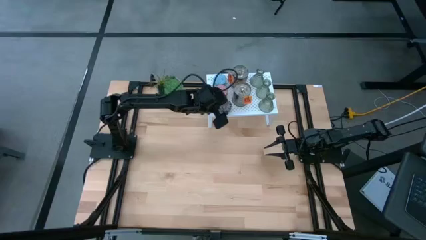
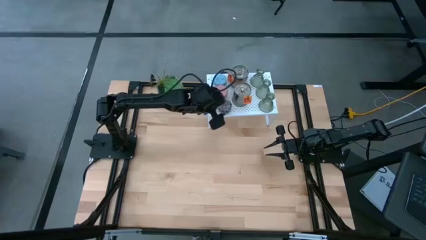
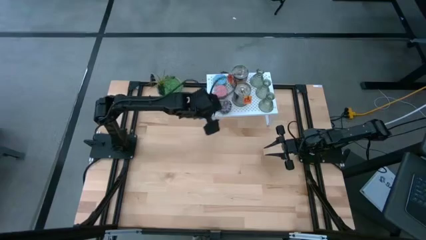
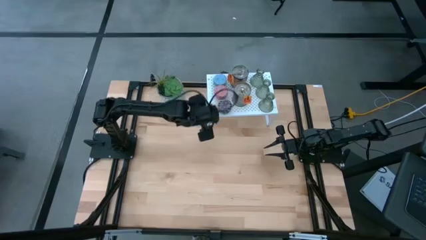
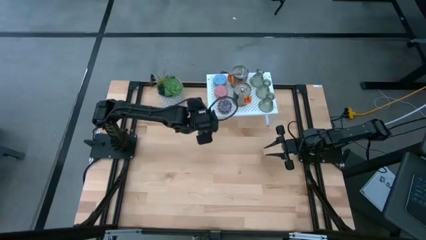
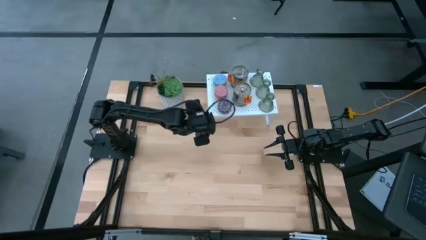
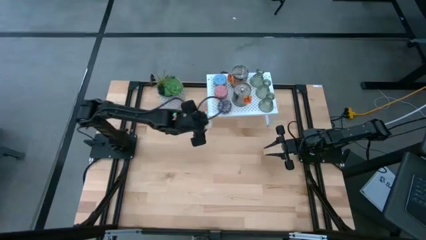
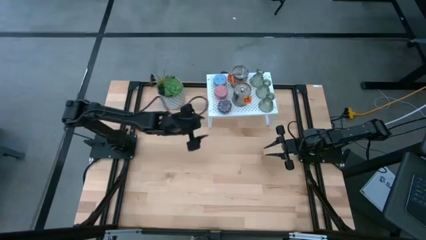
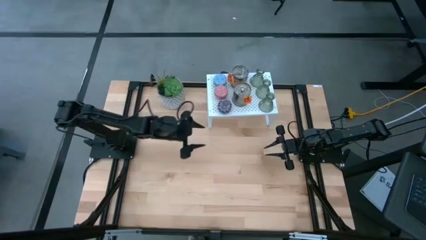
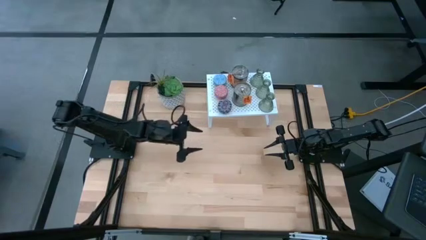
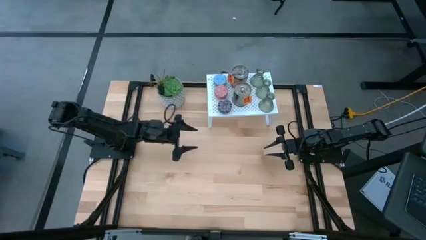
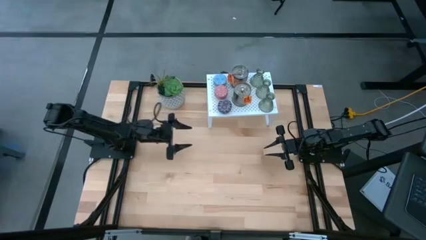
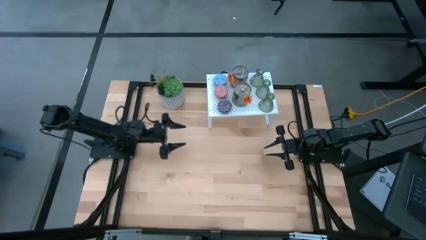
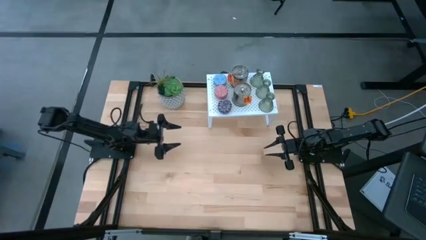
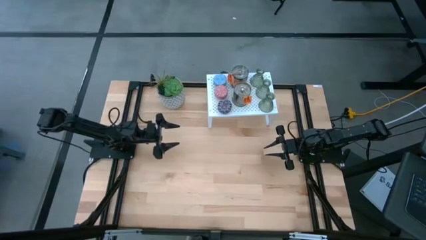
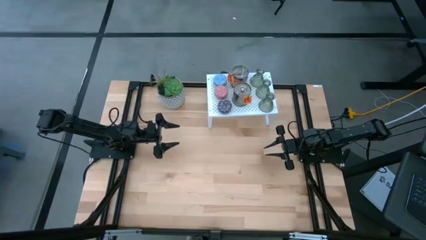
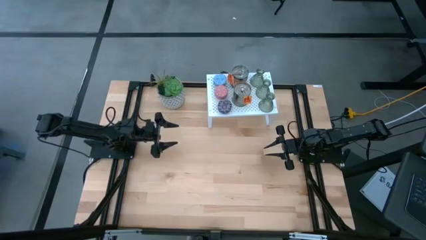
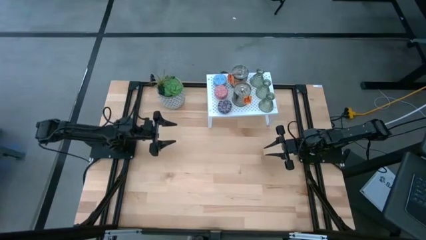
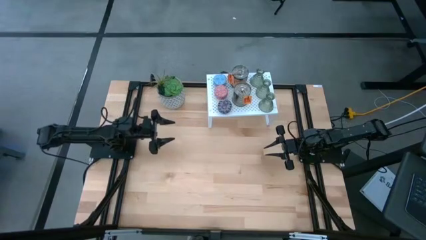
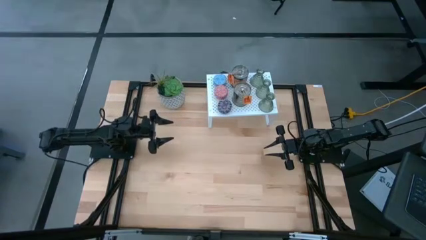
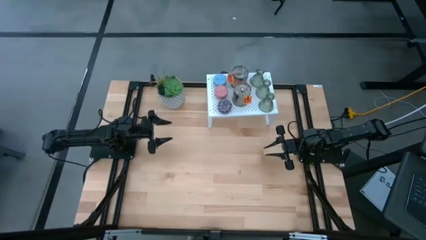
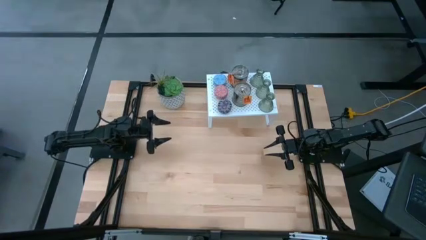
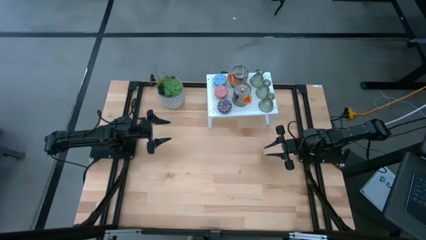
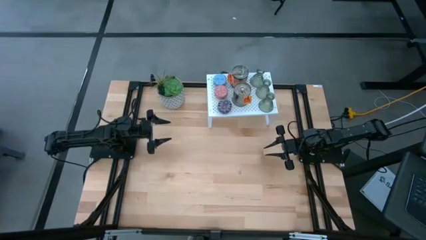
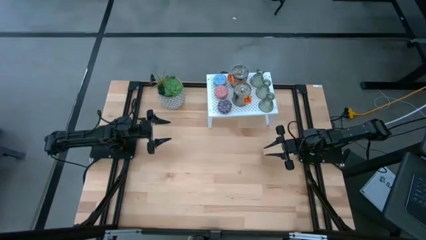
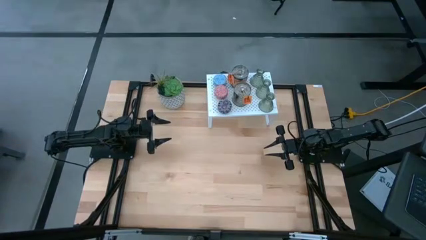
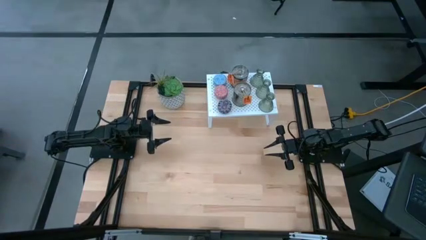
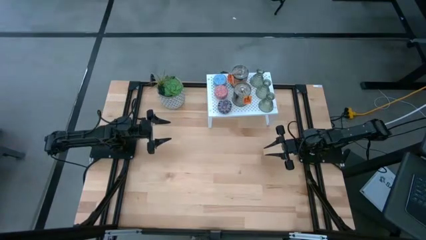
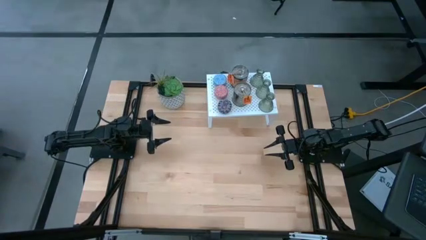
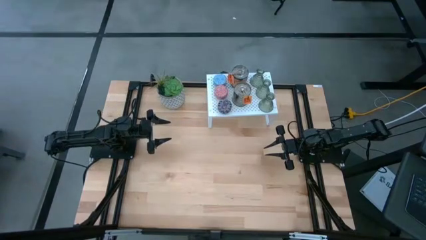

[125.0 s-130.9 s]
Task: Pick & Place candle stick holders
Return to Home Position

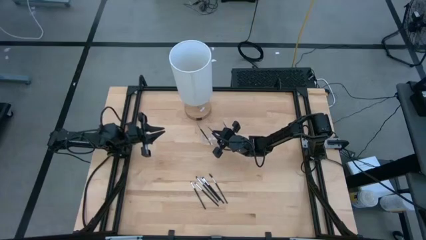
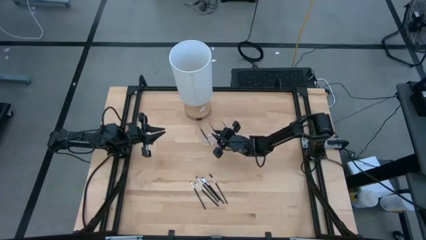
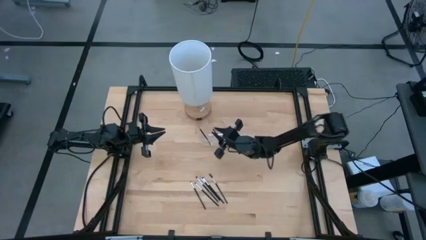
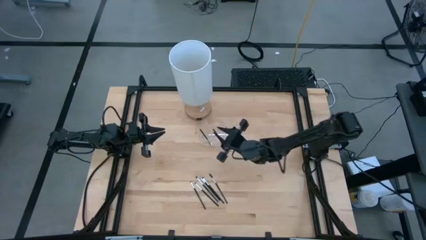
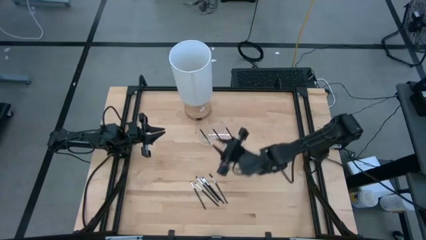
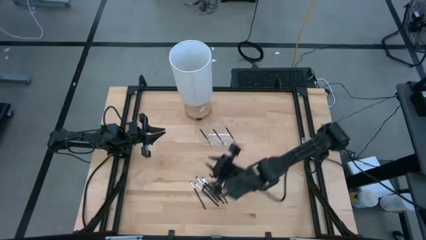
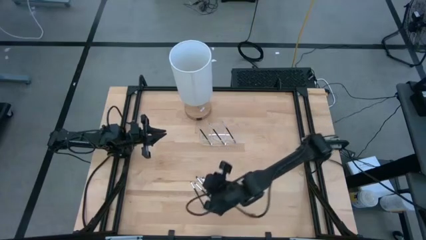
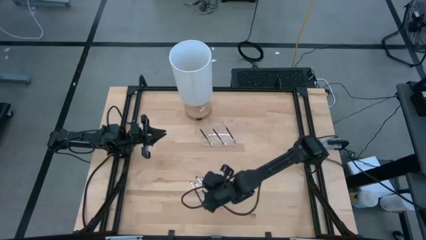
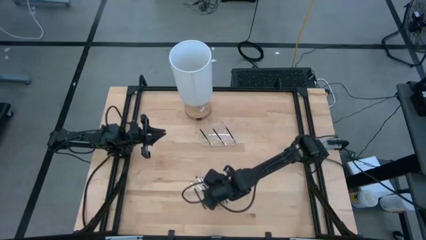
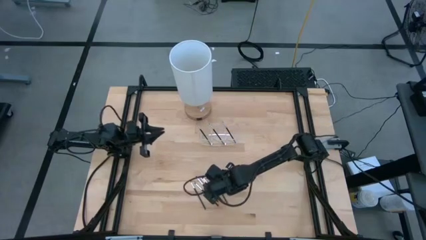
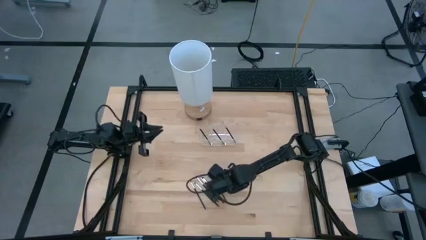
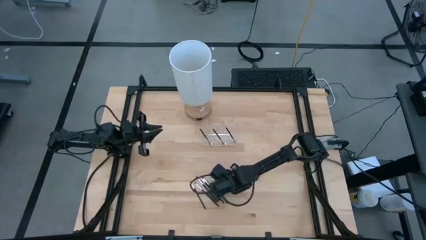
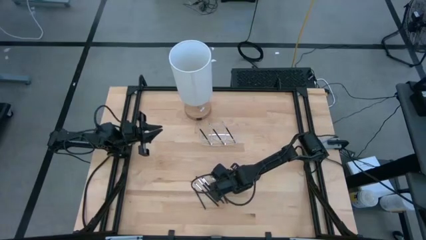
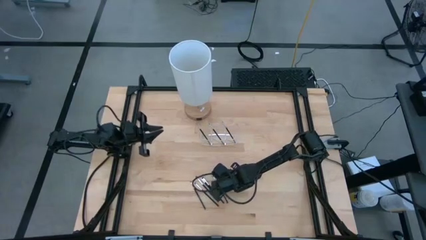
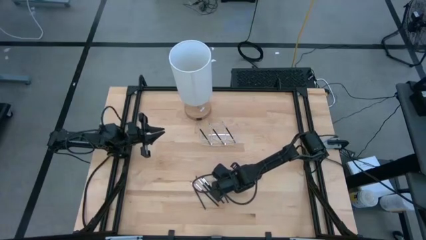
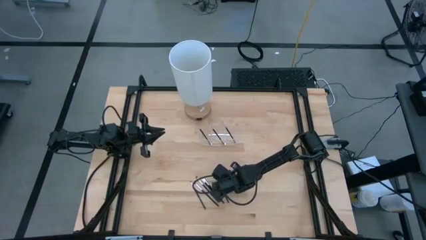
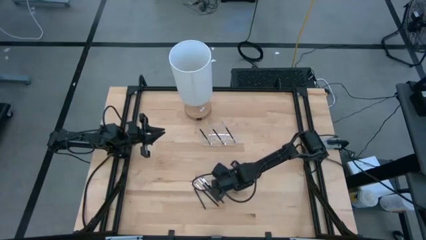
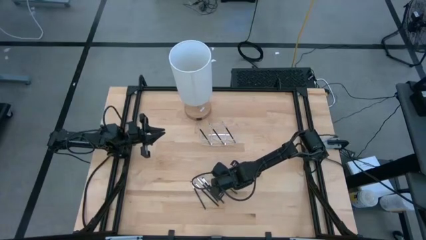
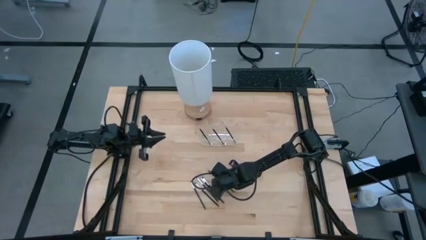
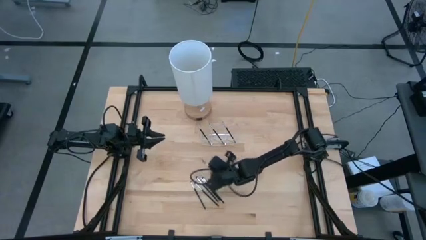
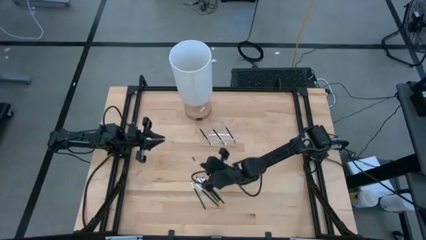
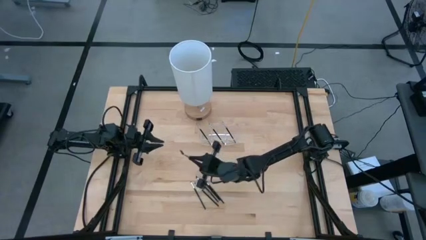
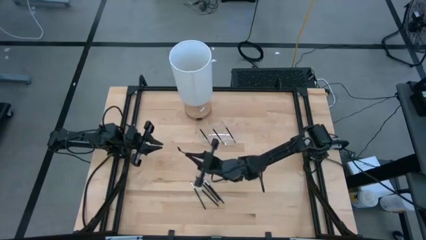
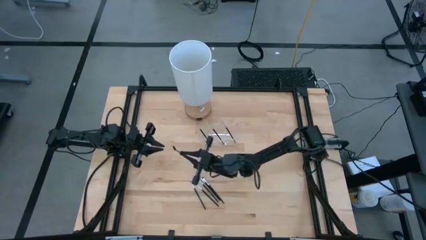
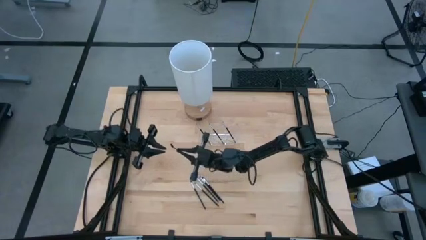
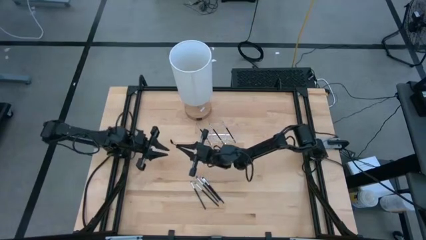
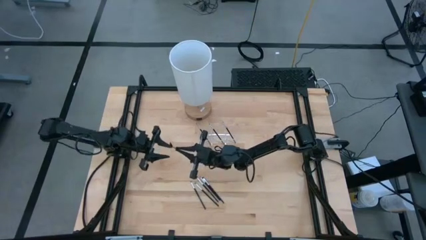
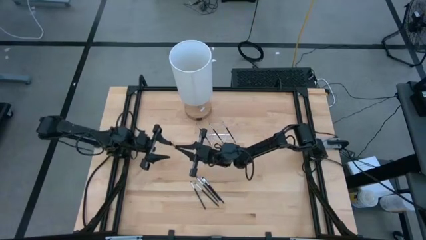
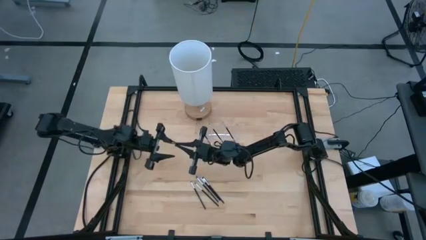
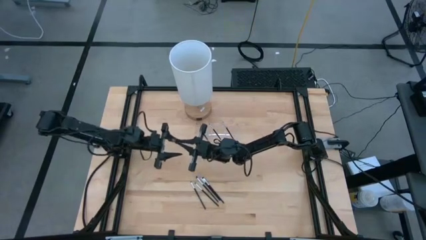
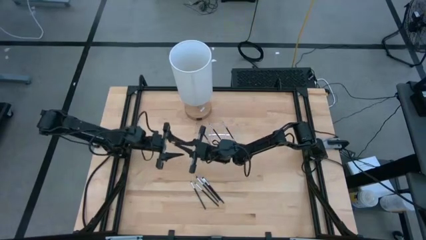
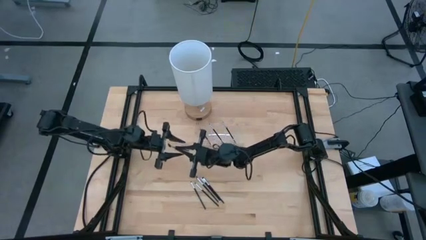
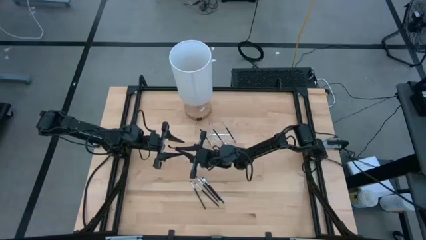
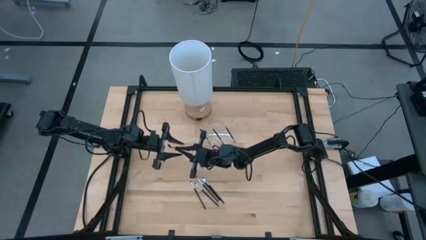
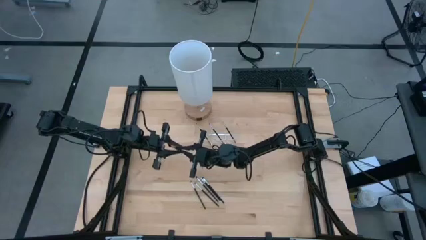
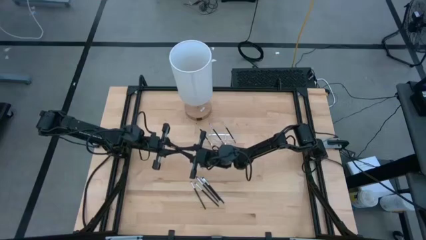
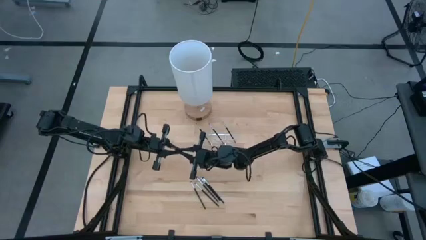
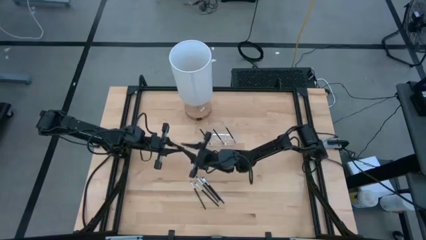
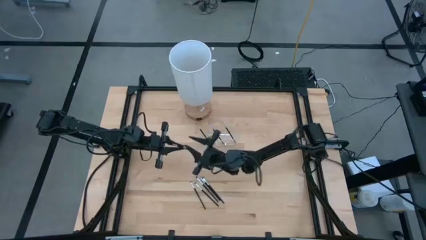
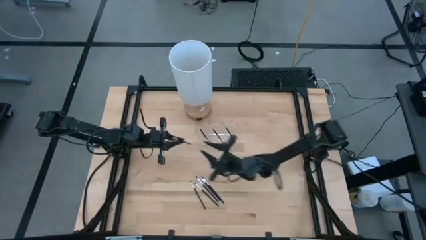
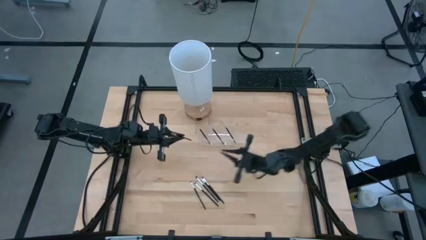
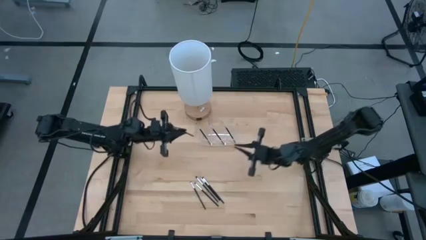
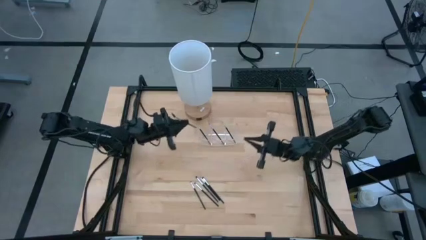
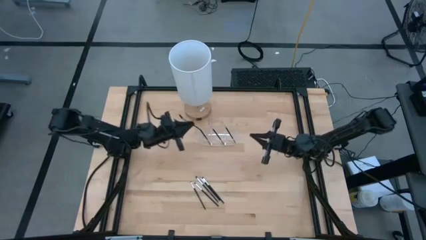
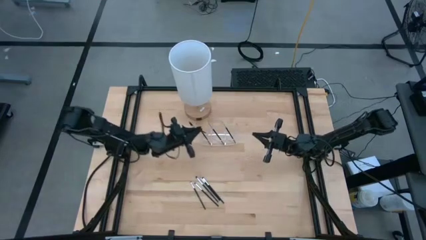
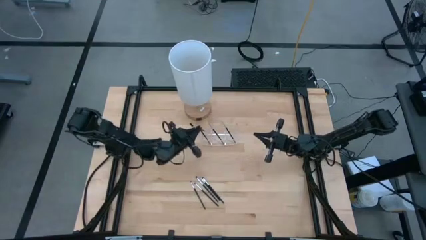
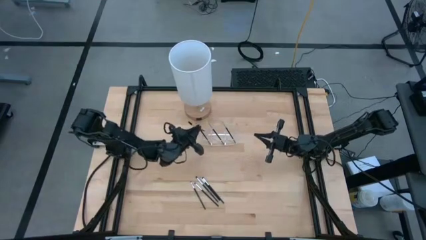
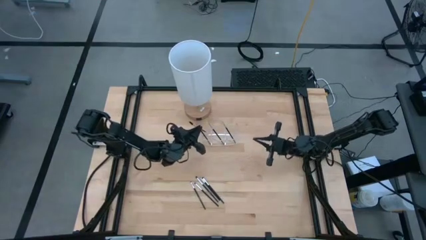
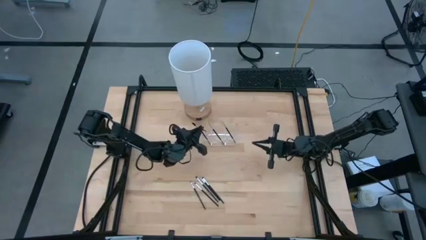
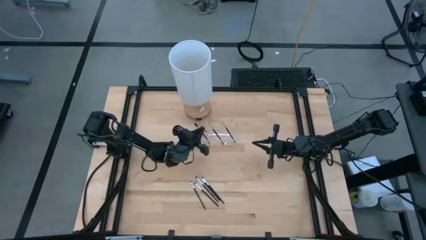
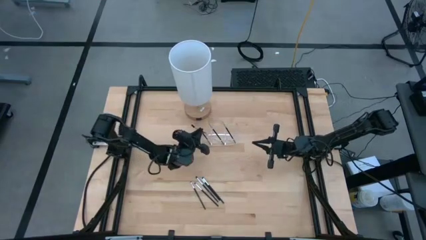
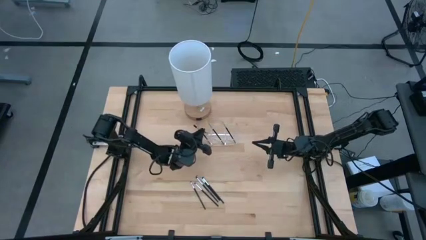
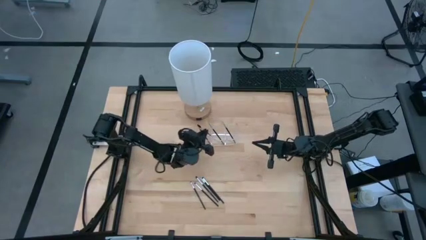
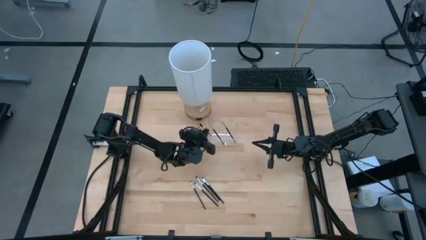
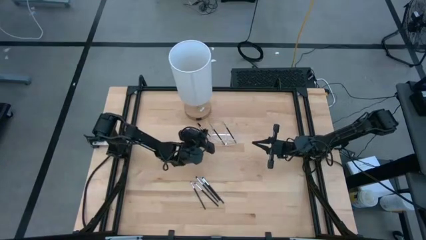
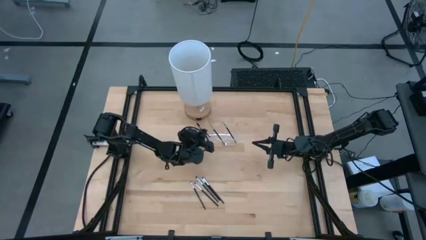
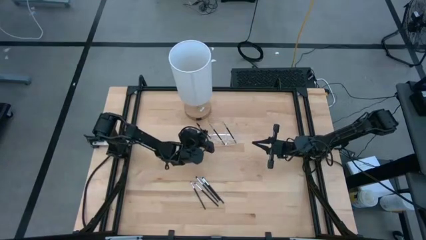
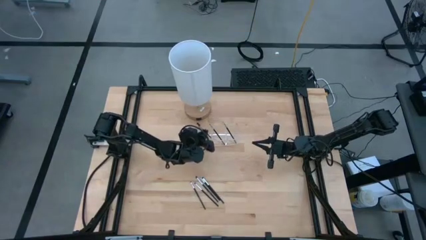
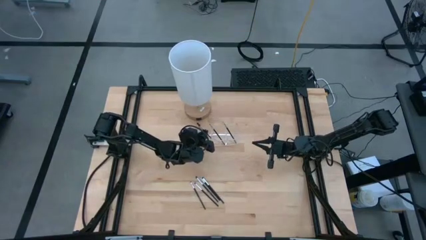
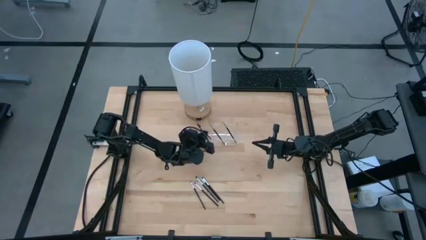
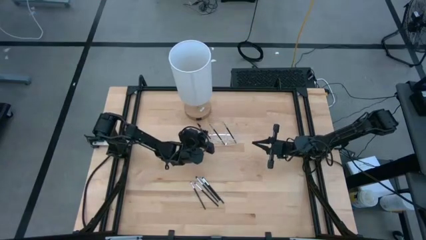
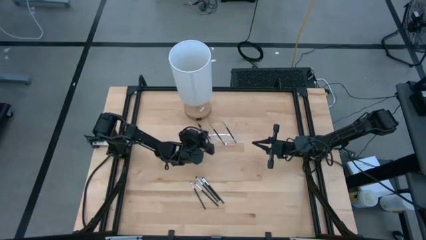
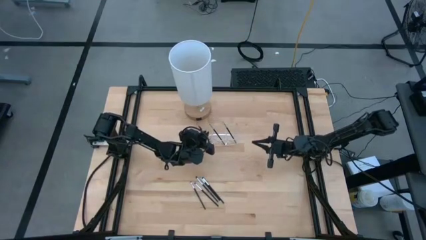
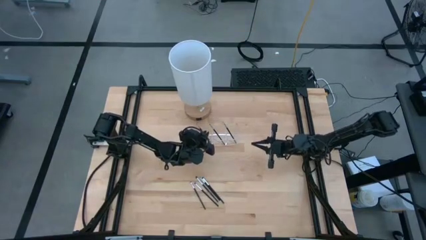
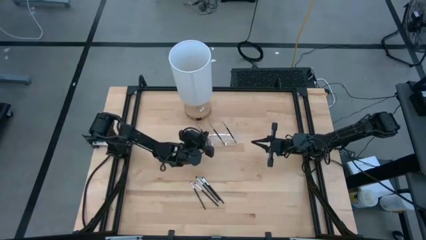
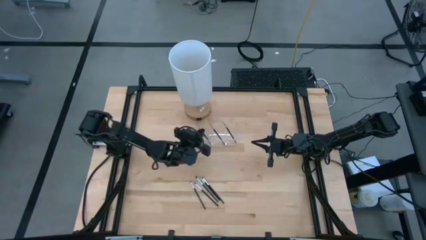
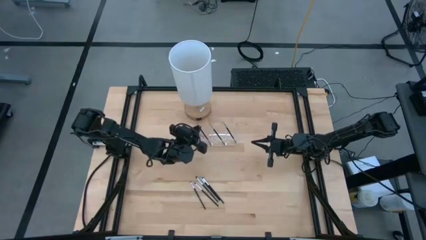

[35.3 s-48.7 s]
Task: Pick & Place Makeup Supplies
Put the makeup brush into the transparent organizer
